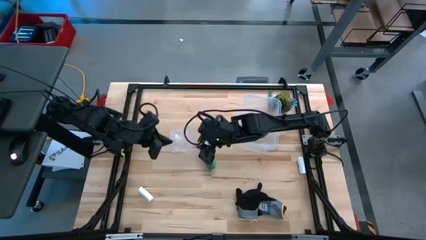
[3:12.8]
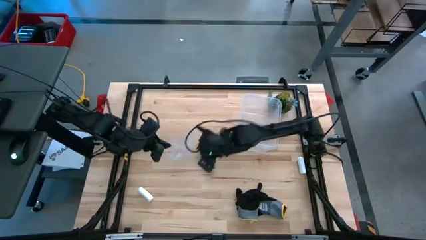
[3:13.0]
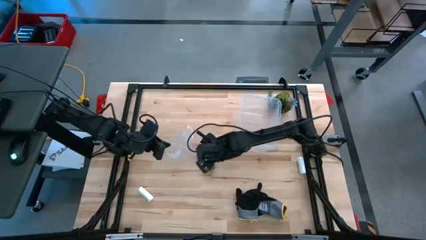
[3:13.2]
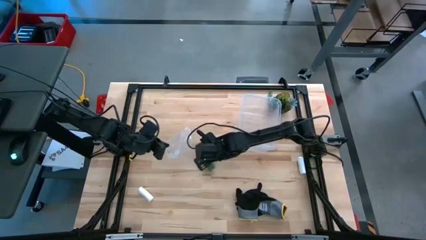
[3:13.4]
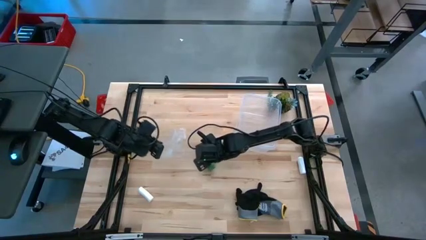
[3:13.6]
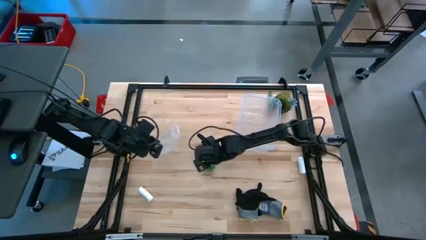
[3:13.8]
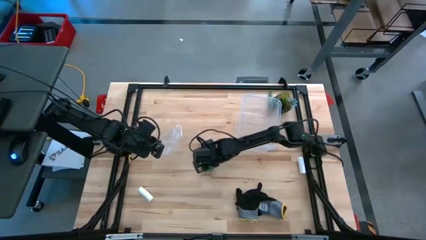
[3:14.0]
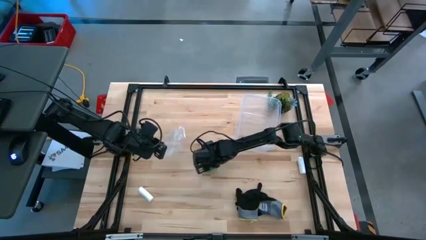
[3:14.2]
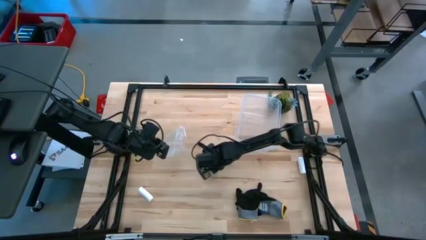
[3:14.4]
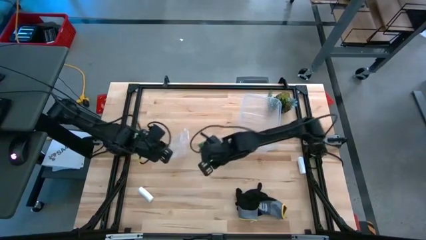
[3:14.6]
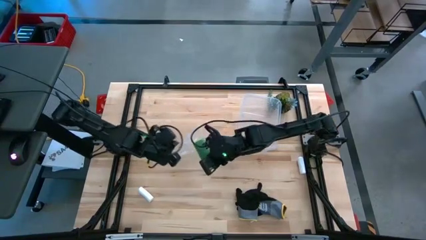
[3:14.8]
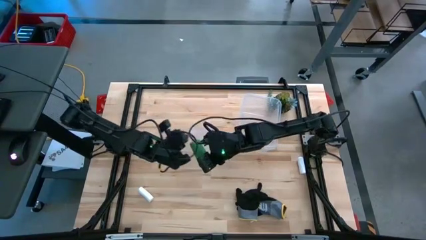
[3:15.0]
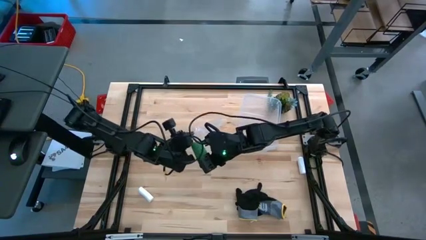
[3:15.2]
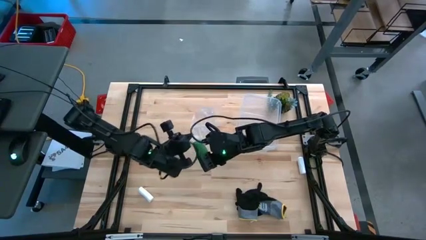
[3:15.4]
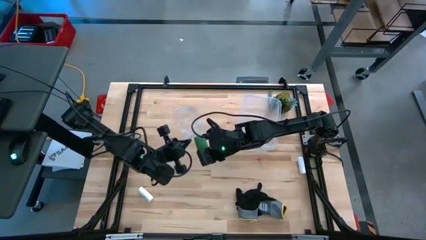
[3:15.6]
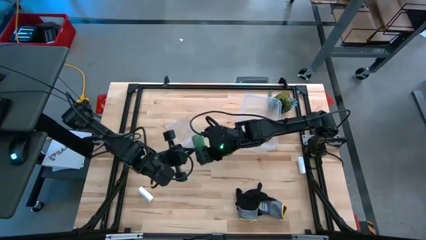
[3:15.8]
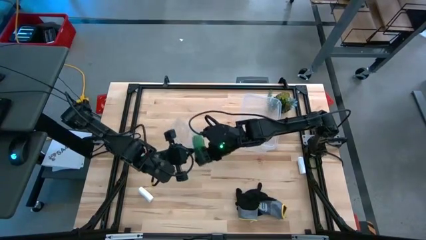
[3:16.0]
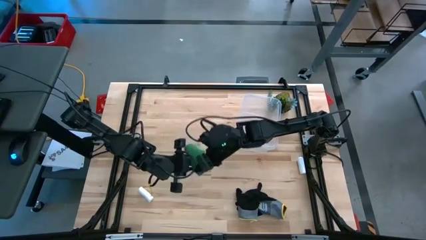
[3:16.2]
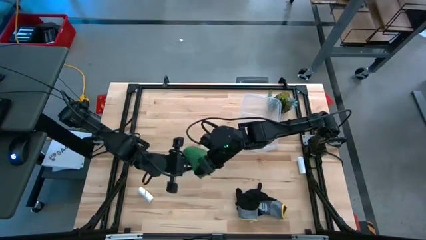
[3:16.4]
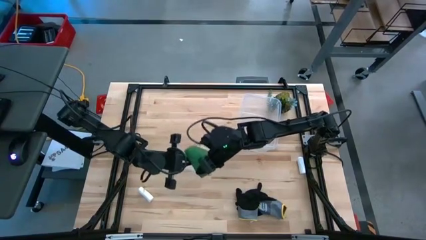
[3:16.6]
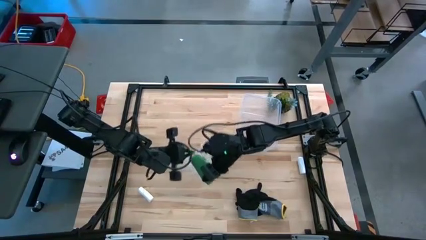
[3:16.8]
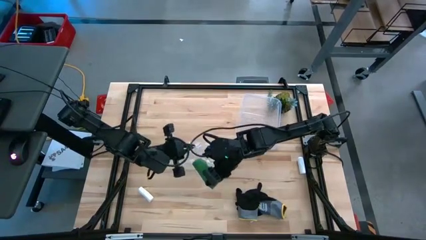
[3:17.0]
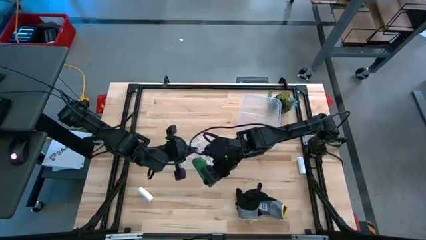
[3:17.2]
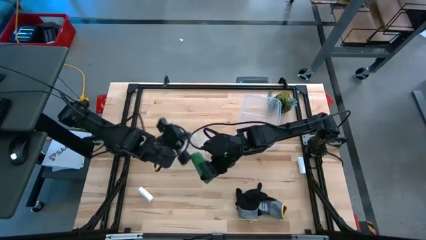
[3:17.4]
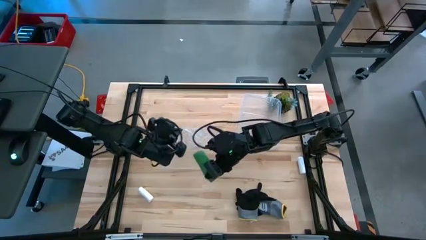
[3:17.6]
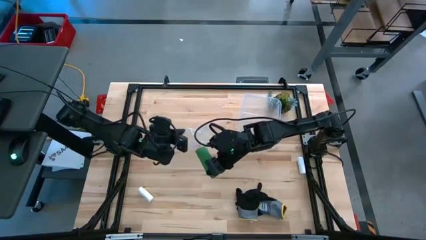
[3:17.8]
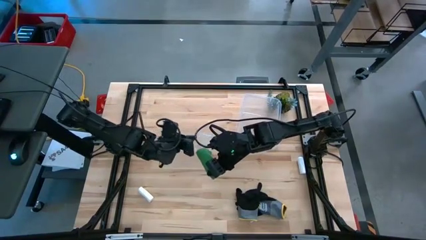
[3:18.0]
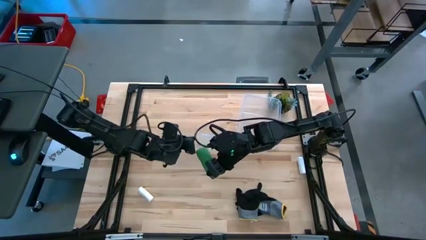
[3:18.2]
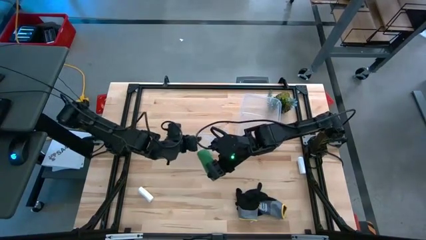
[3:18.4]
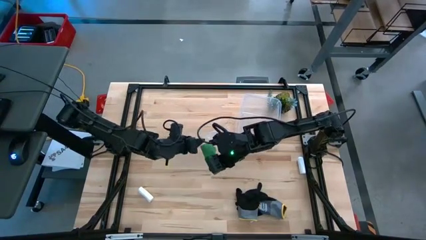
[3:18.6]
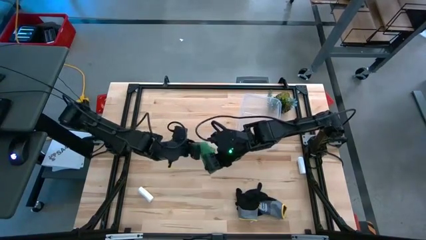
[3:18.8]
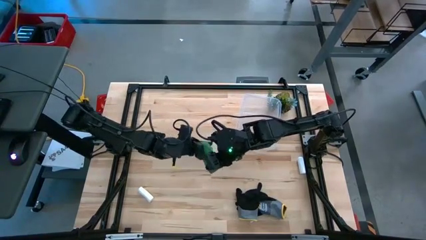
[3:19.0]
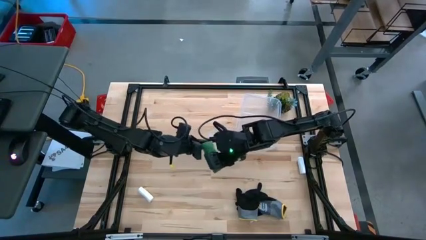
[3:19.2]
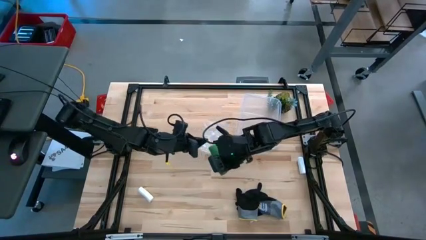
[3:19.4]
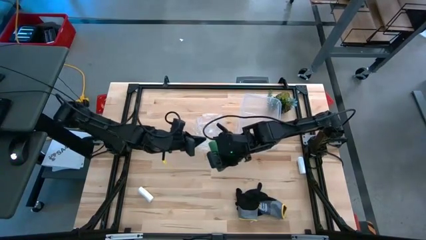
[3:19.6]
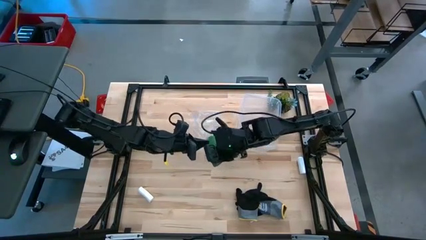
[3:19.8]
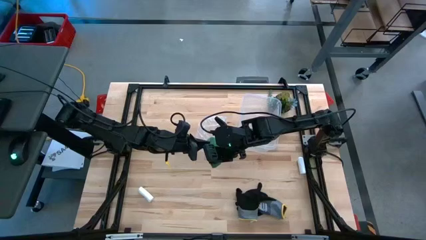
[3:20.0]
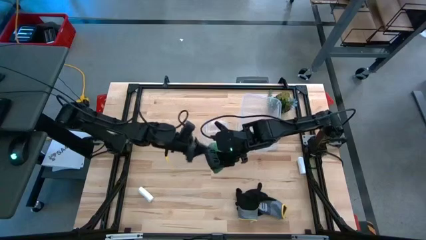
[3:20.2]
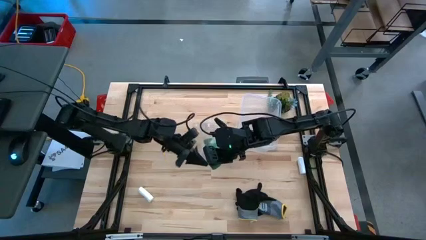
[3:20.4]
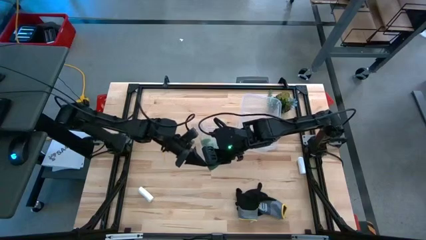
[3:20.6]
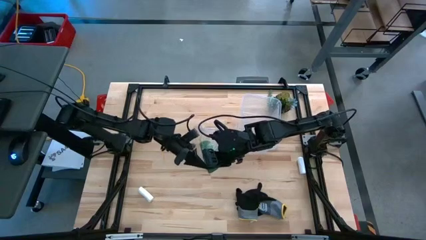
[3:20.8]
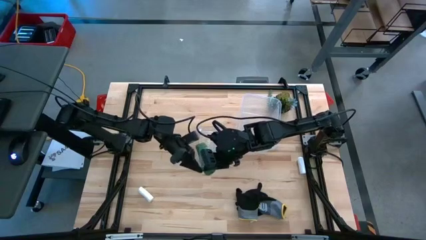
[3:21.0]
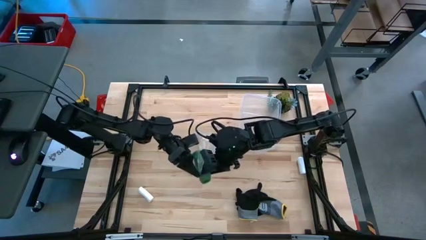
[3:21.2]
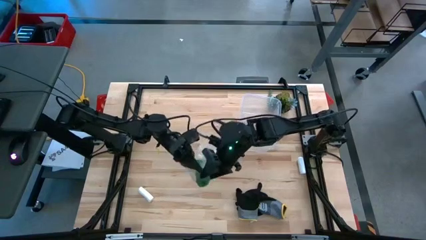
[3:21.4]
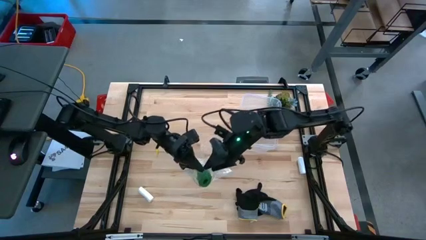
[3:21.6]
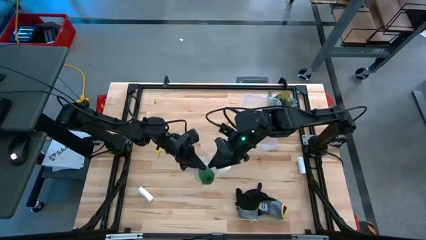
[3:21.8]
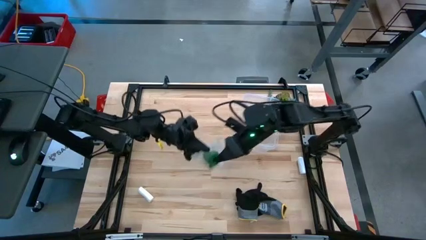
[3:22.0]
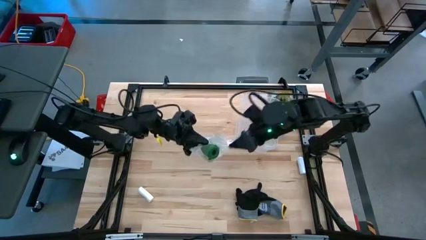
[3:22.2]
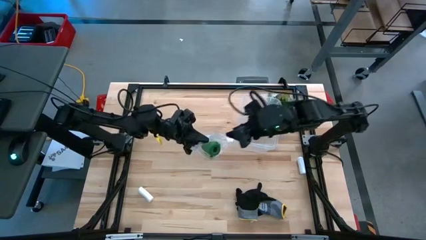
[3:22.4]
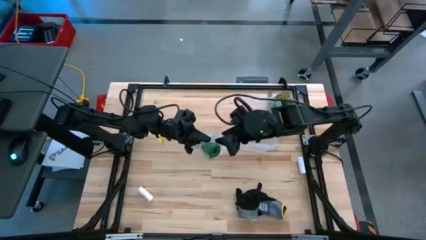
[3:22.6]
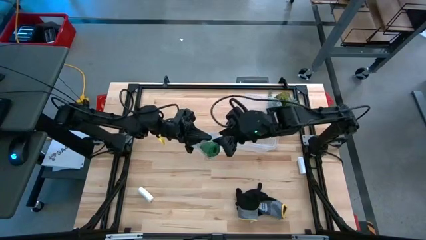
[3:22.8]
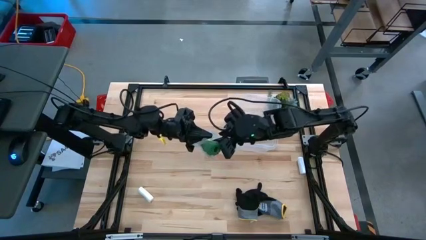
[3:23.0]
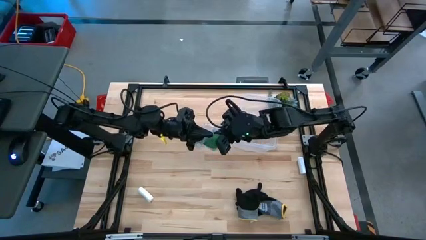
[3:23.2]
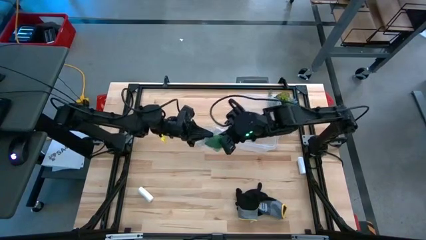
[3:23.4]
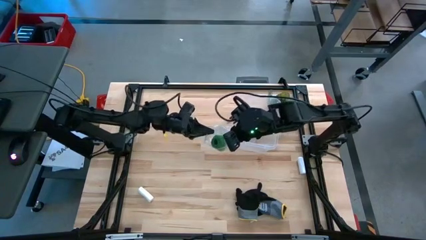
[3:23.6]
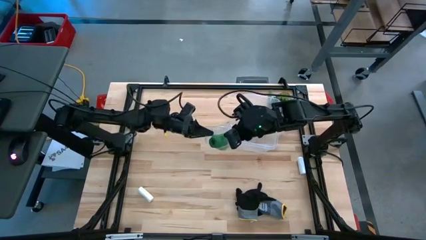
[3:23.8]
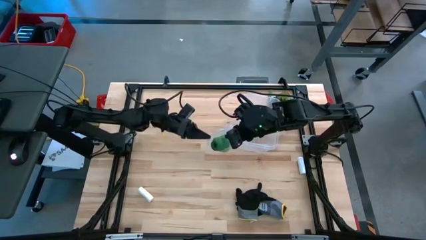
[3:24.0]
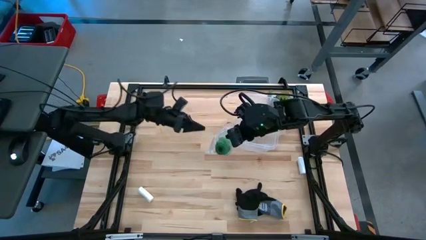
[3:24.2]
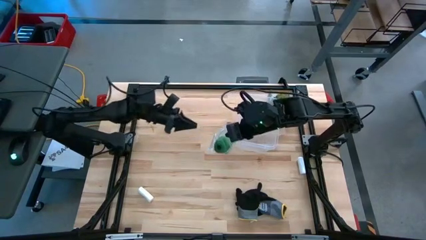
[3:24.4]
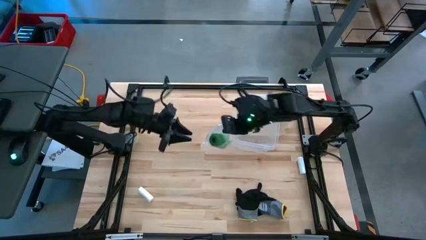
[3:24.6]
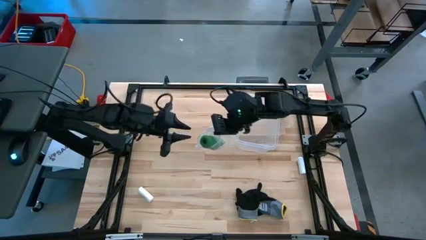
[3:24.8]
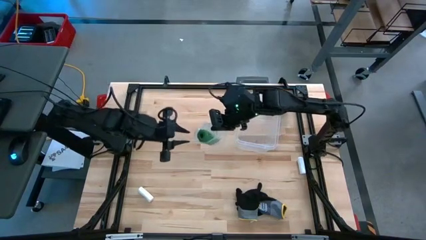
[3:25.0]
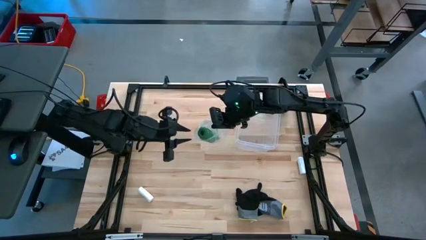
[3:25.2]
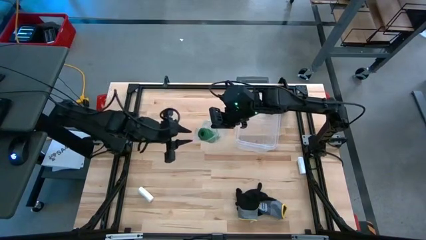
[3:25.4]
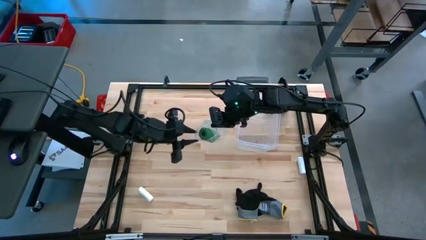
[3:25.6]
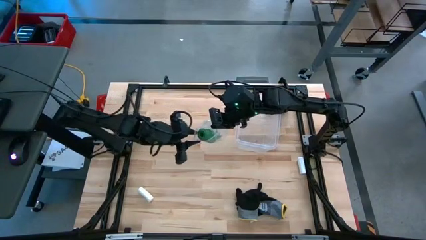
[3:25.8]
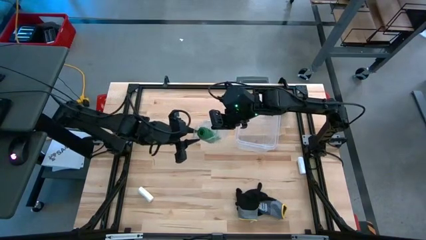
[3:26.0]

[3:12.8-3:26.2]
Task: Roll bandage
Put the green bandage into the transparent zip bag

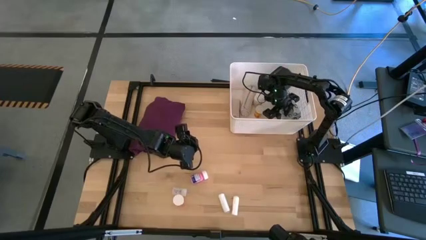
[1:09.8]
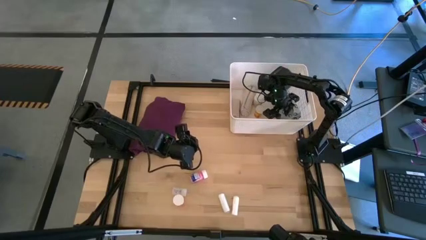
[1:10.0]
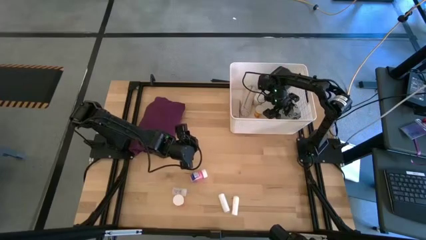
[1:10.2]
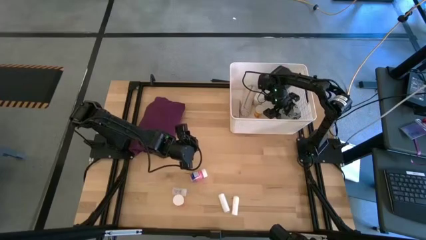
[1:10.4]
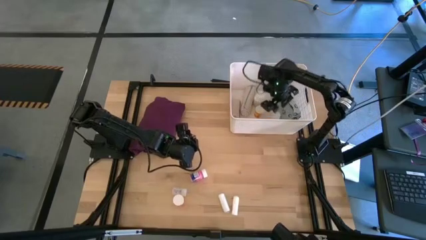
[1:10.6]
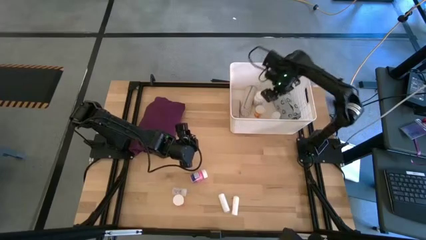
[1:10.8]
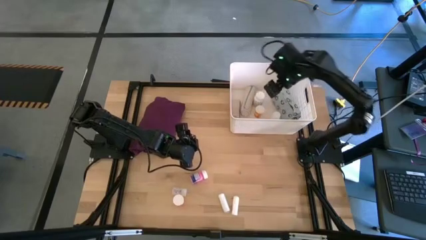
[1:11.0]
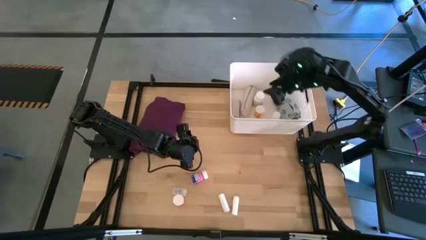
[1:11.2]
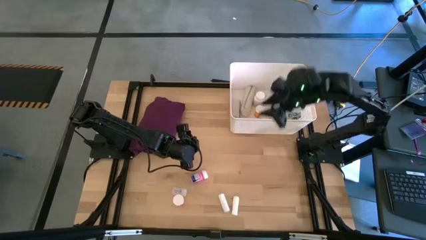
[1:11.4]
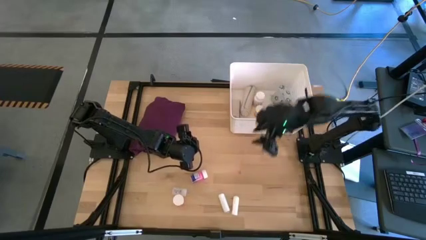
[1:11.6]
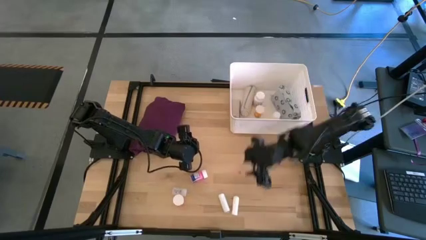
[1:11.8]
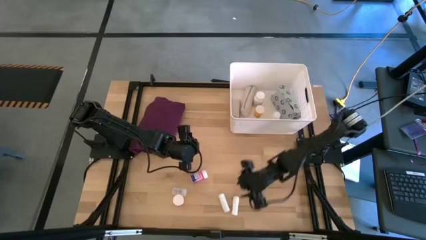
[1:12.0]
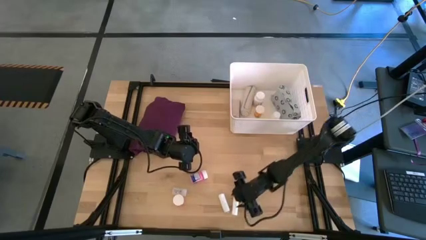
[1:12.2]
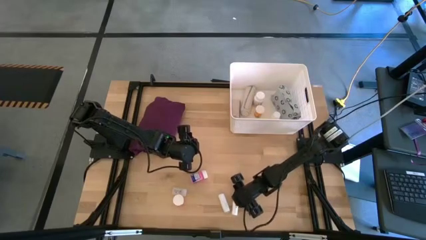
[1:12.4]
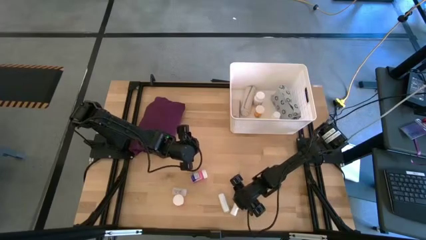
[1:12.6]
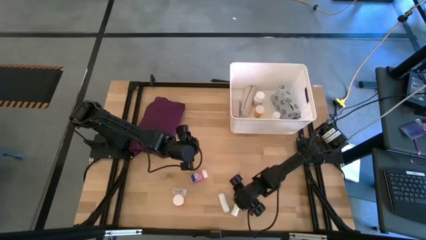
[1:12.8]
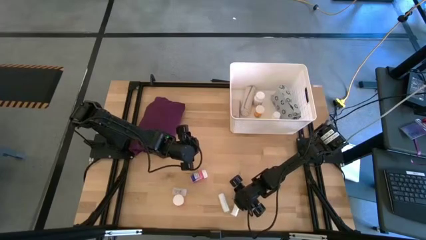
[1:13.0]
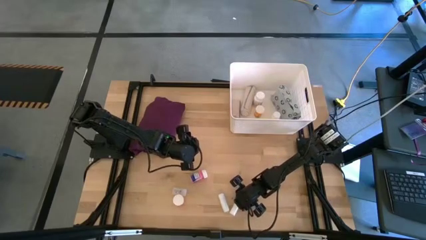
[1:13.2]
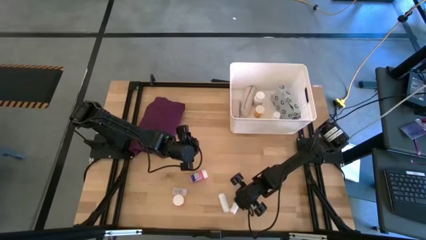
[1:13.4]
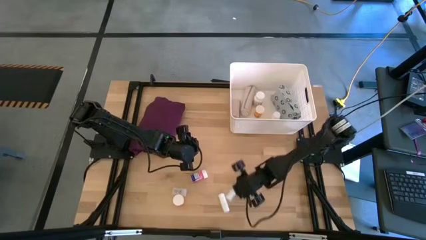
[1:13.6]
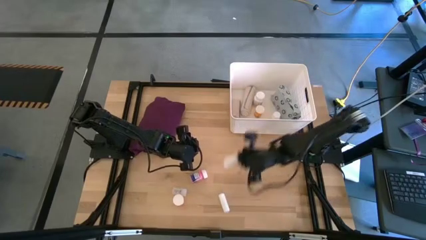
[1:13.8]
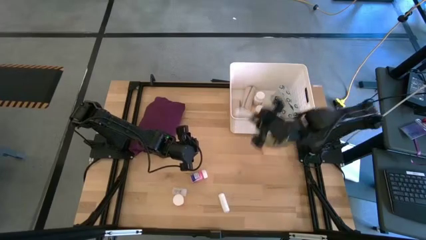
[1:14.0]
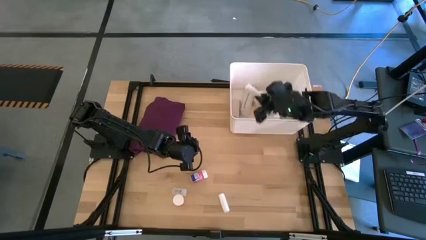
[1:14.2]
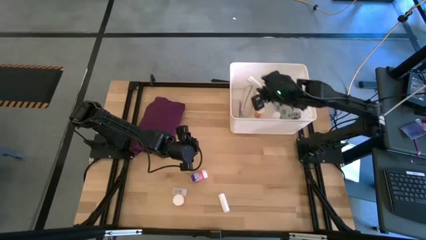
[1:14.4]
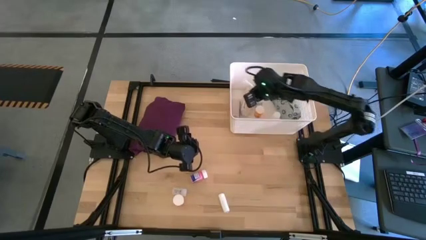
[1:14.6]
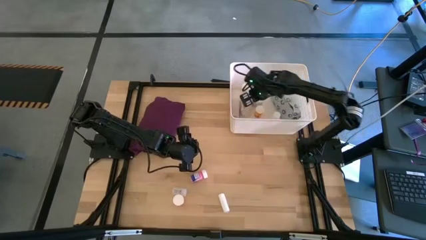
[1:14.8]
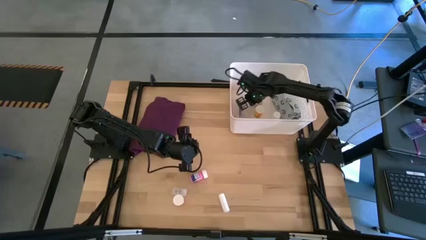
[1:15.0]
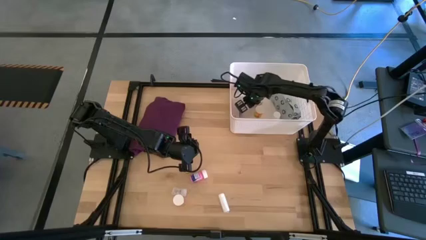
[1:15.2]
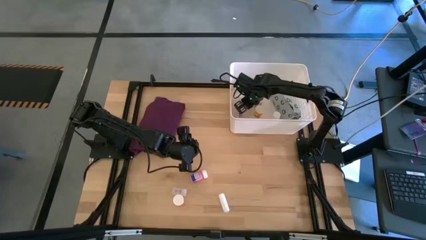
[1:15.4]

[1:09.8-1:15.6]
Task: Pick & place medical supplies in basket/bin
Put the right white rolled gauze into the white bin
